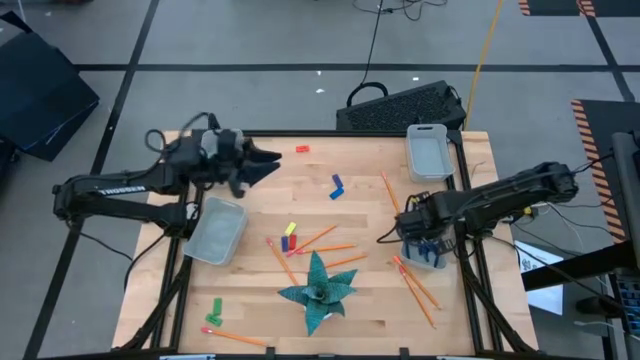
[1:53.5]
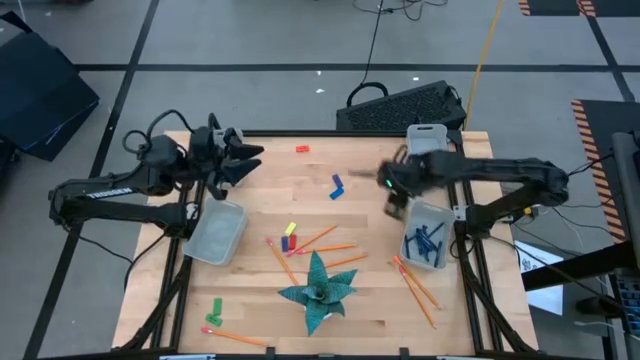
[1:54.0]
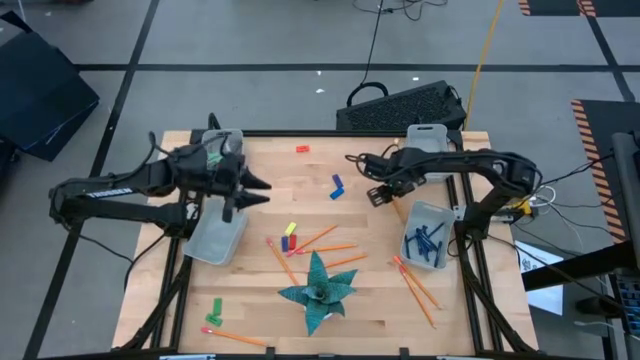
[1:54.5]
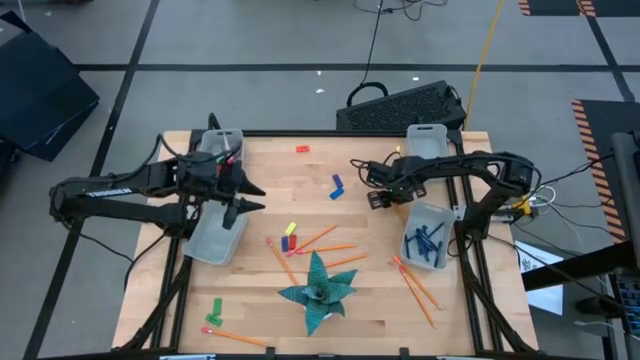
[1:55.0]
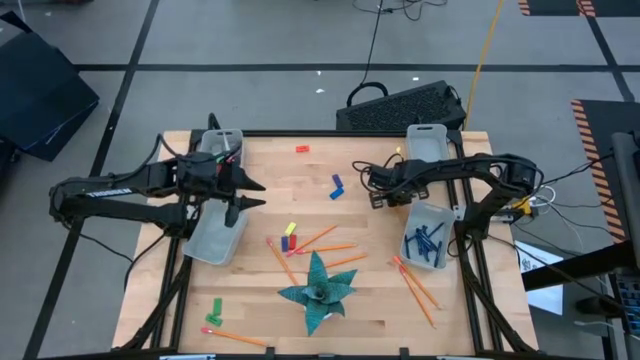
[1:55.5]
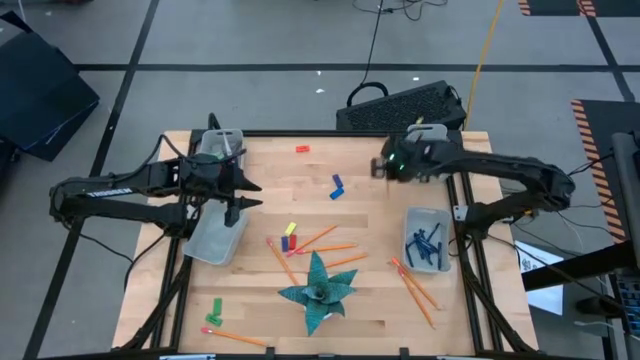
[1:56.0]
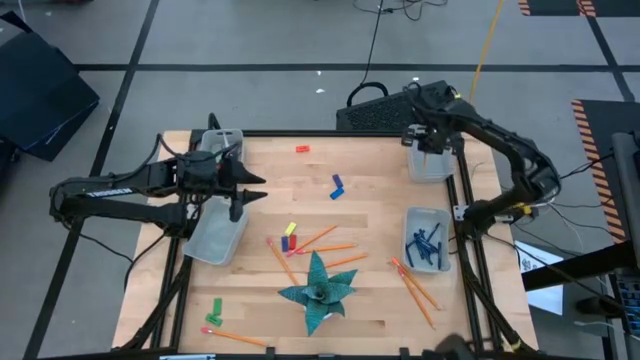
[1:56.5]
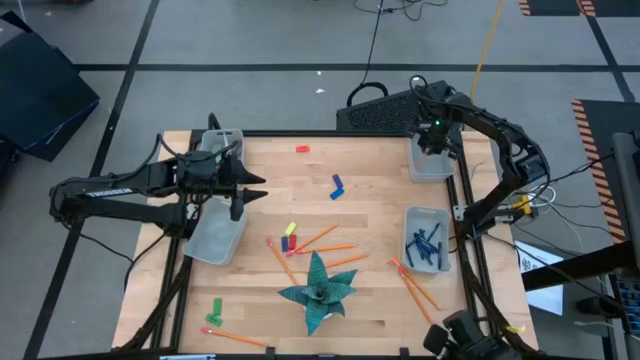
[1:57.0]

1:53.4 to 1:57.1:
Task: Sort crayons/erasers/pens/pencils in bins
Put the orange pencil into the top right gray bin

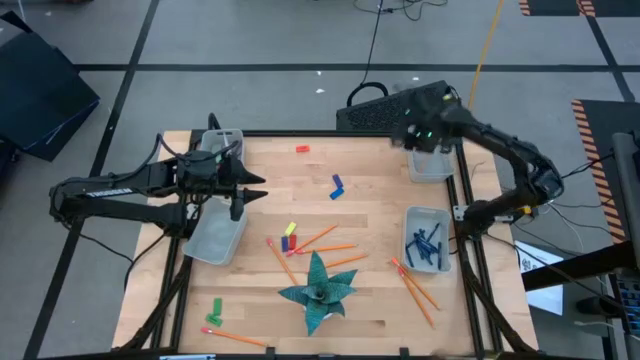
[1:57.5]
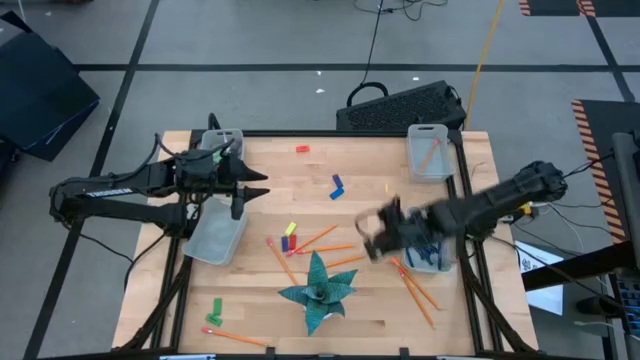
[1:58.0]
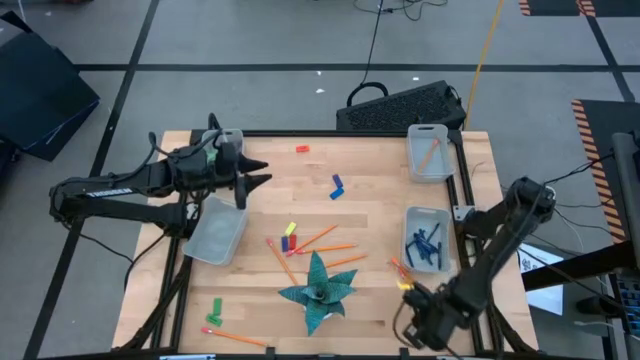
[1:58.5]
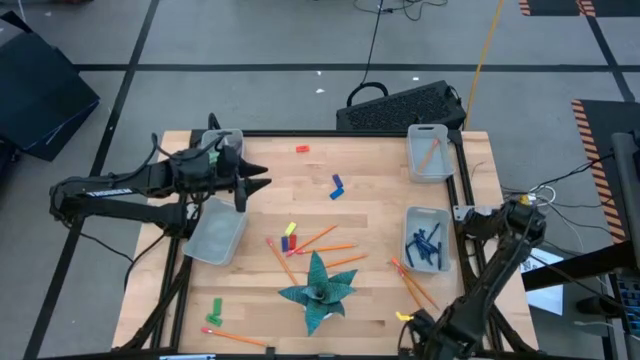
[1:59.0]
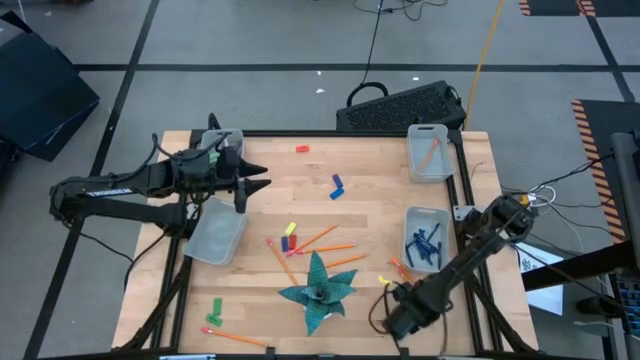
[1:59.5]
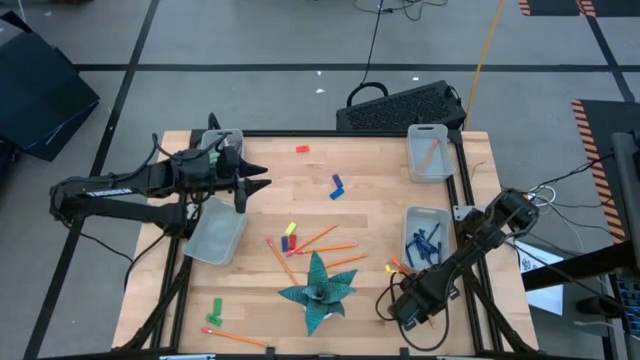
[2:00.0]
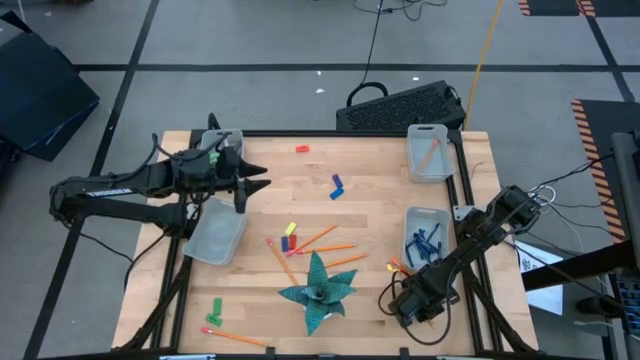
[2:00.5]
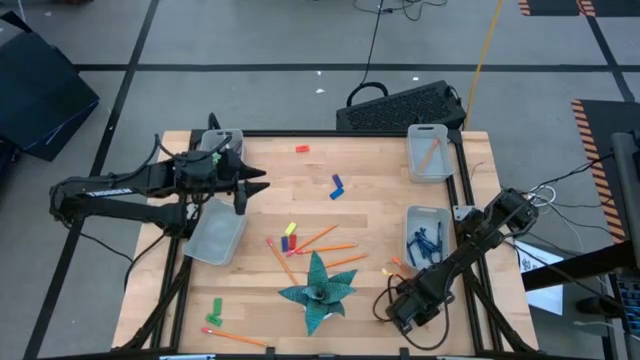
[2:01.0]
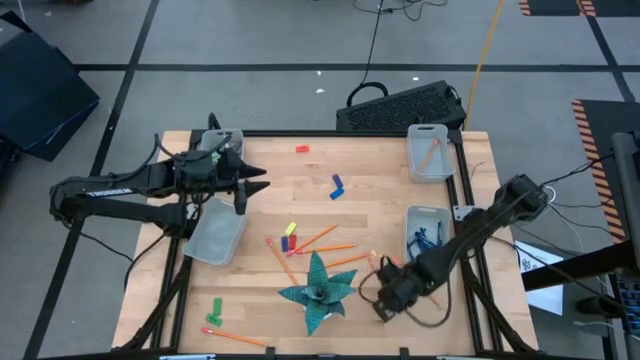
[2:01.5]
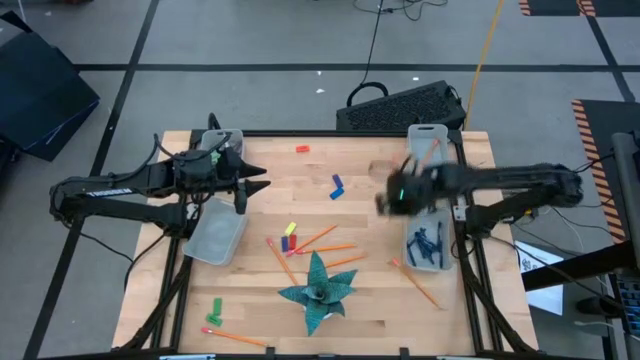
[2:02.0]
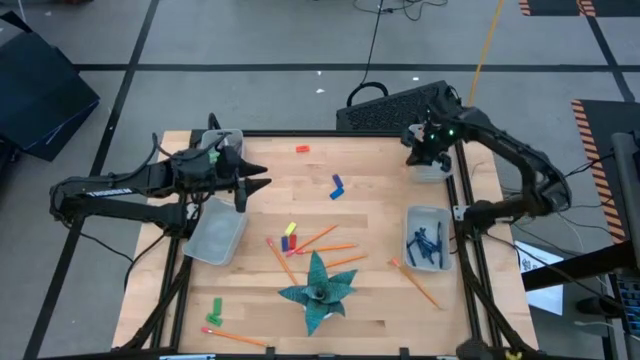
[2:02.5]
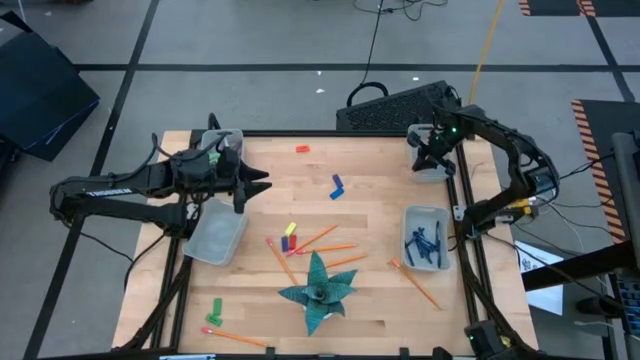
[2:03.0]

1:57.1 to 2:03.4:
Put the orange pencil into the top right gray bin

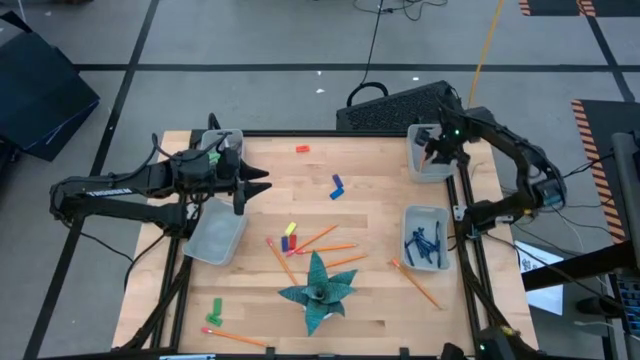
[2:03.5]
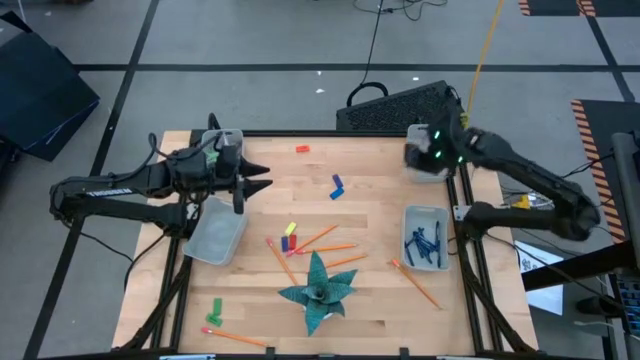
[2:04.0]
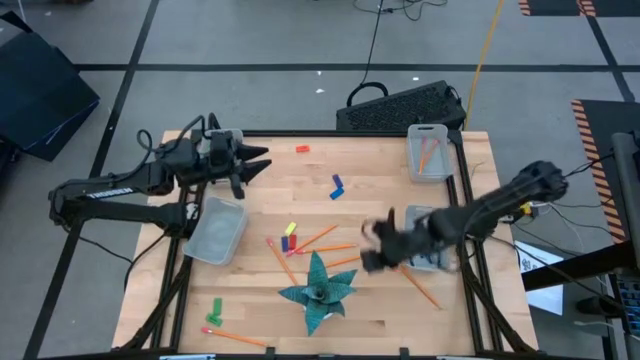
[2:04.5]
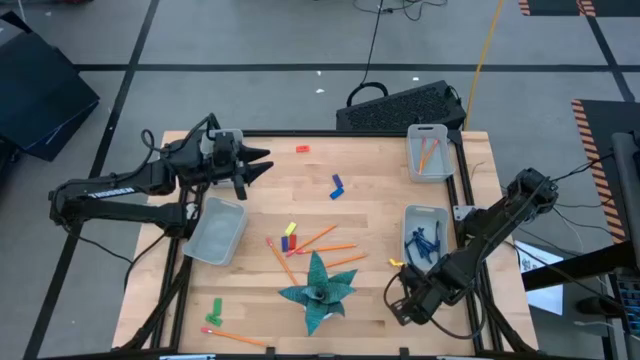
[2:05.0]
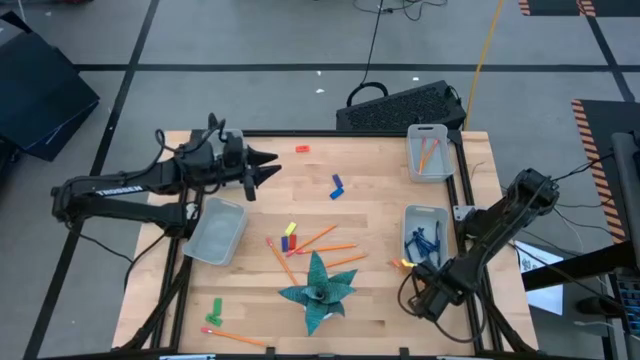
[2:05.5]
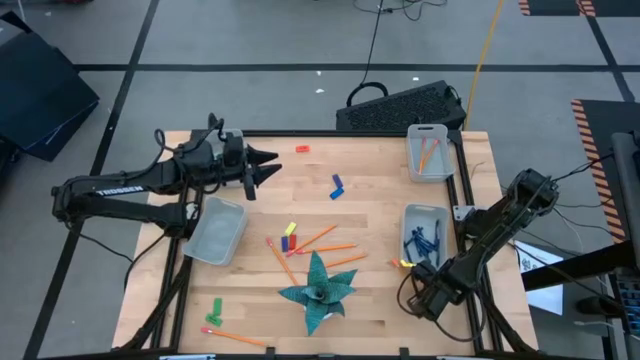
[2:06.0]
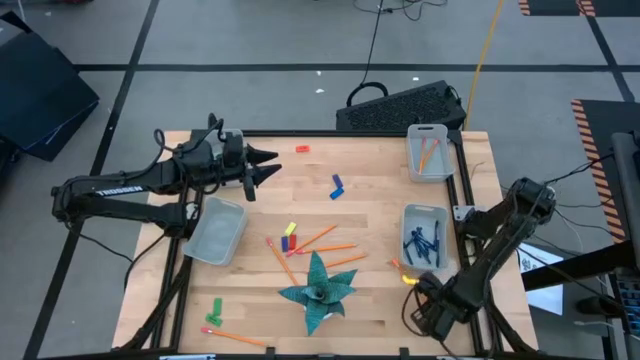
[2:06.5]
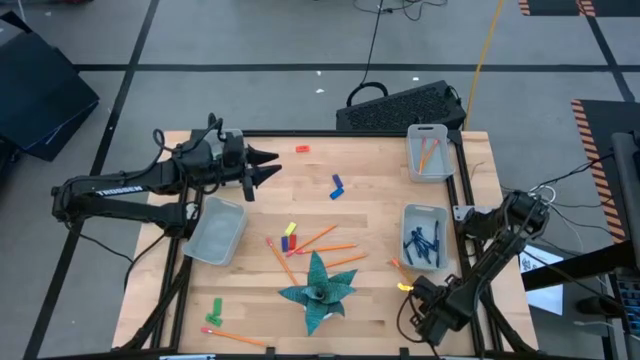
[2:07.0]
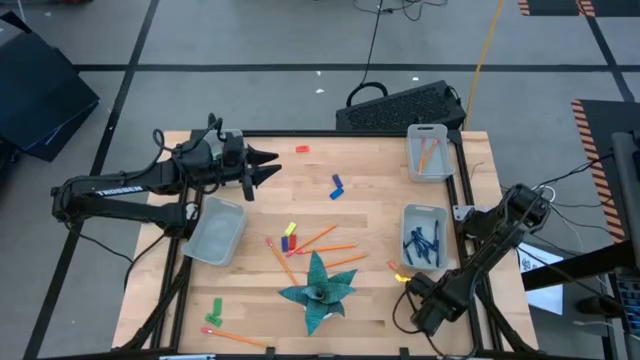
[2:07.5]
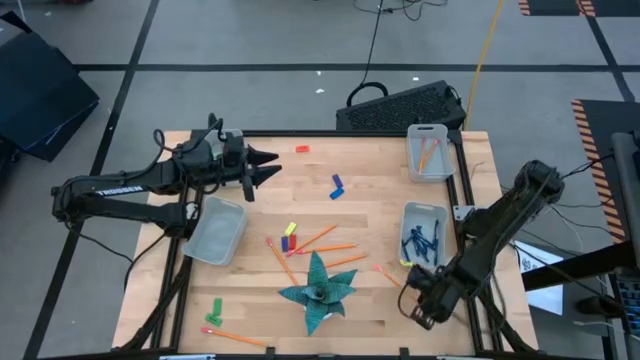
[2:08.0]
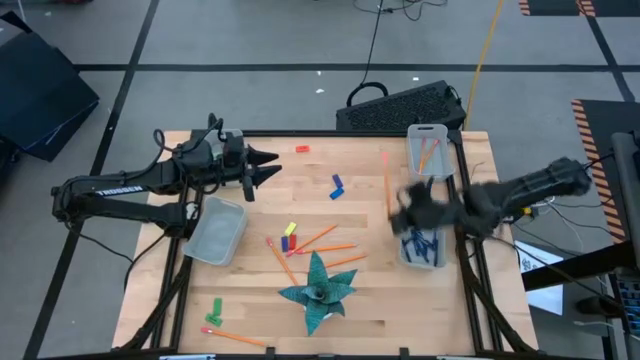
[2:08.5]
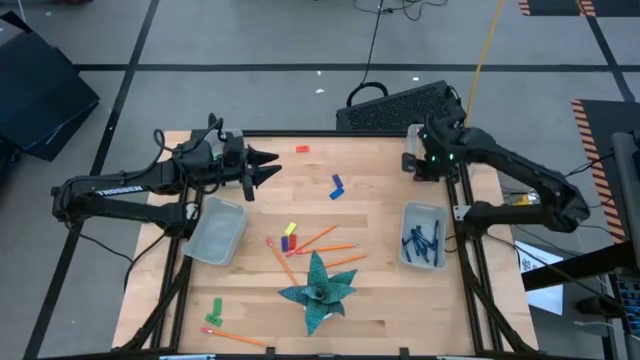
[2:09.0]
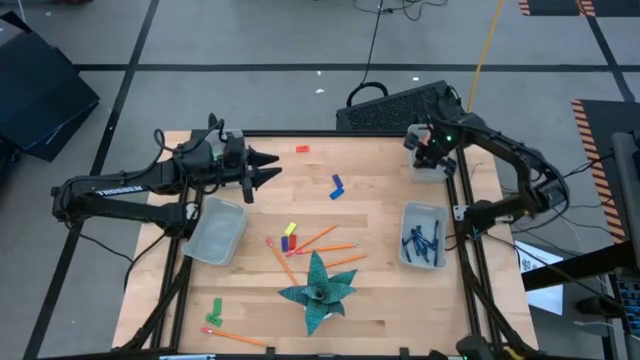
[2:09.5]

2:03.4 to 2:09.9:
Put the orange pencil into the top right gray bin

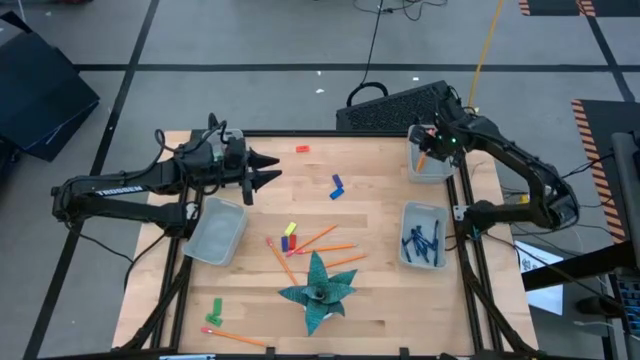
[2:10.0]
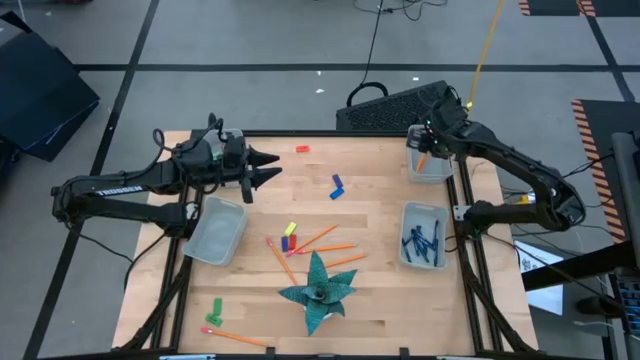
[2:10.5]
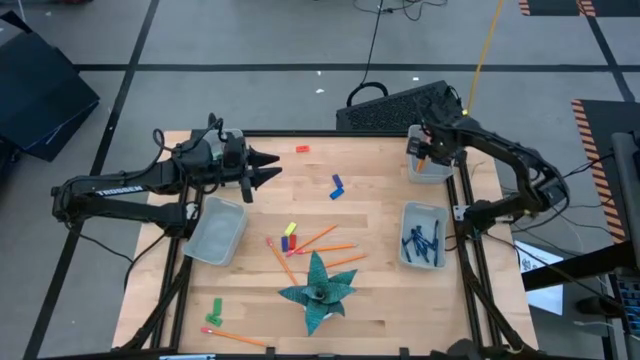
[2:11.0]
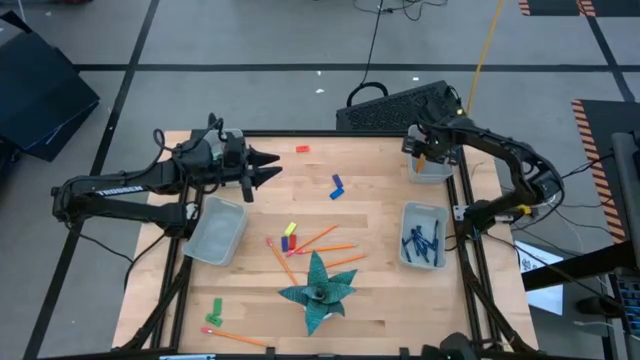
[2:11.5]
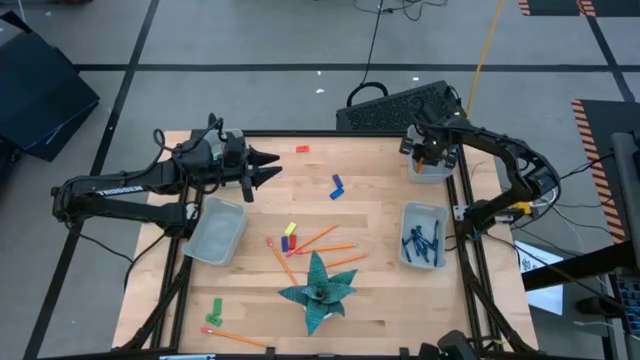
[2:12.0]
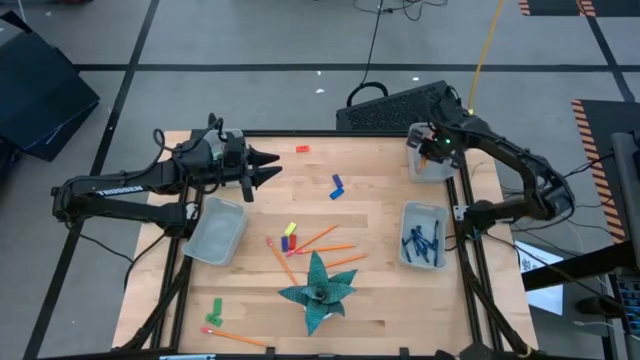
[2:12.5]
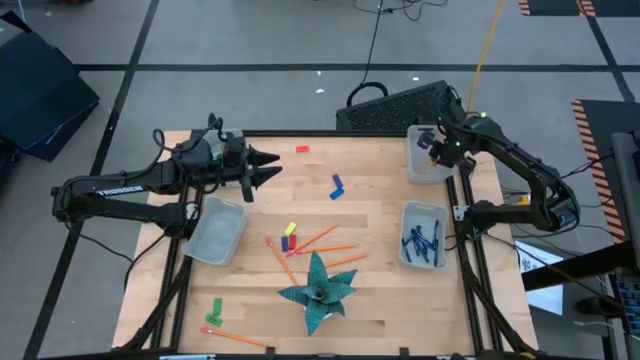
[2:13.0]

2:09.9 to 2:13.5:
Adjust the pencils in the top right gray bin

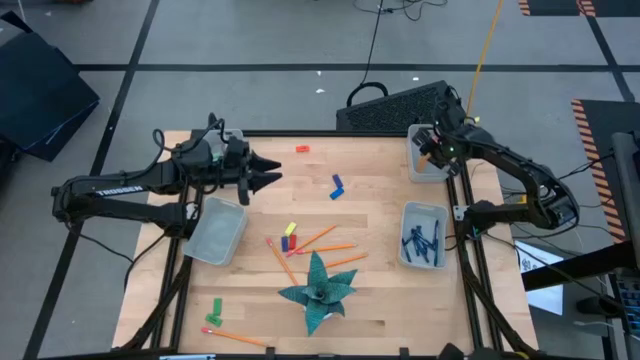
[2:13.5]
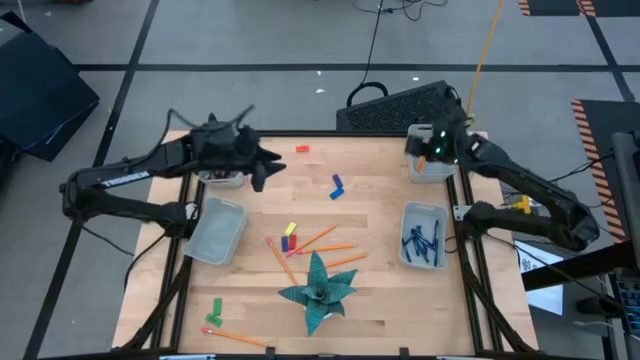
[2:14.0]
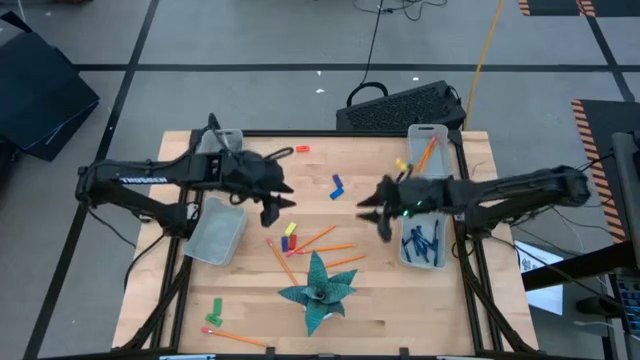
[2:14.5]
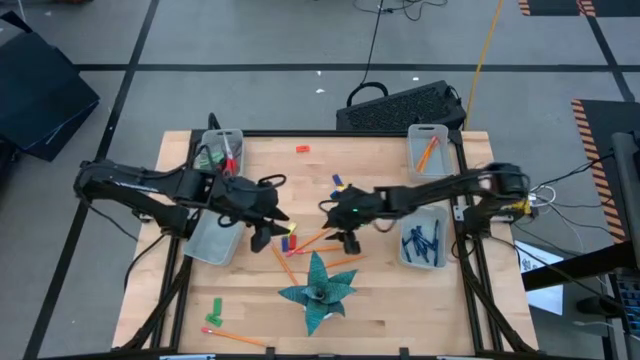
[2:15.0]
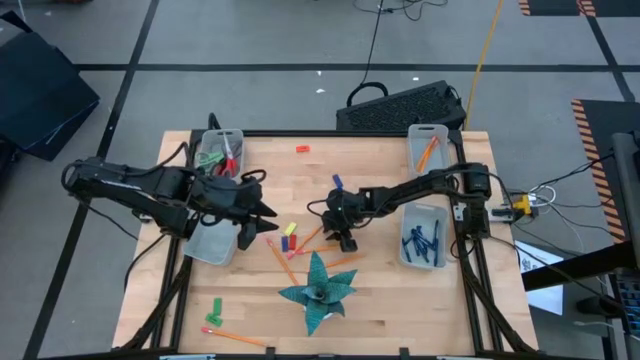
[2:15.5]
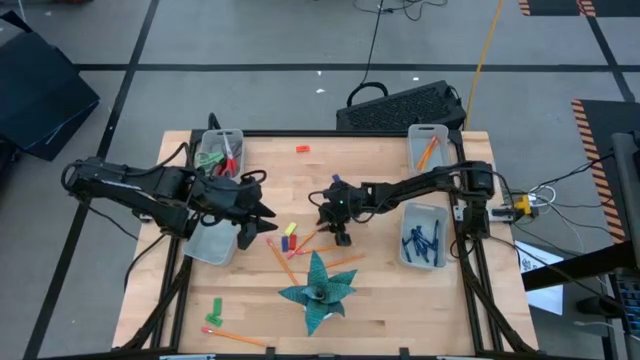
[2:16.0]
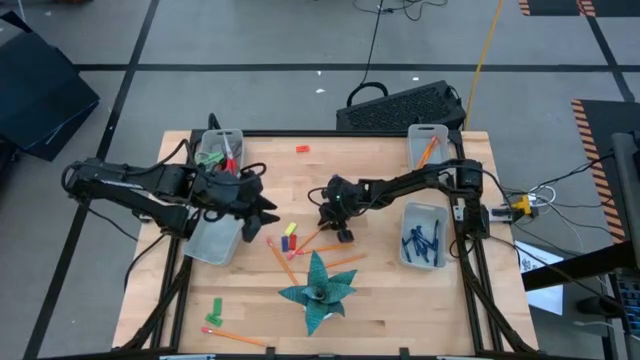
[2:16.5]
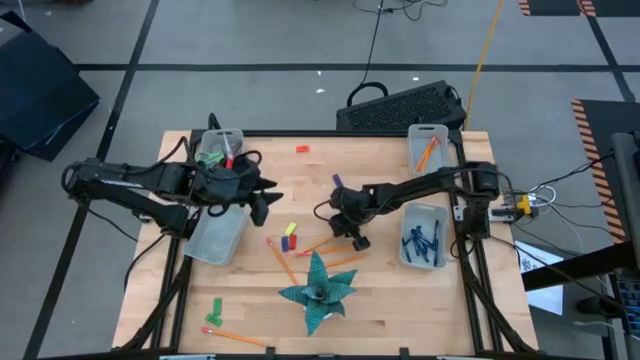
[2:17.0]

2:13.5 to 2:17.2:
Put the orange pencil into the top right gray bin
